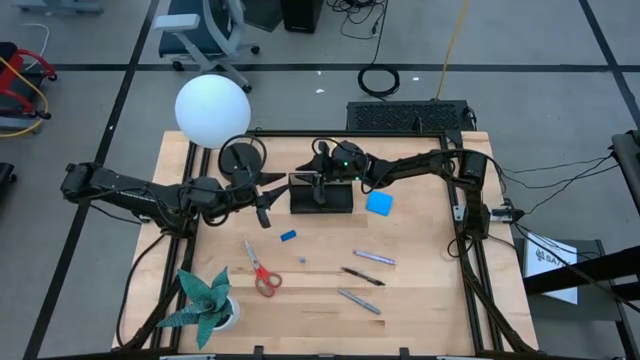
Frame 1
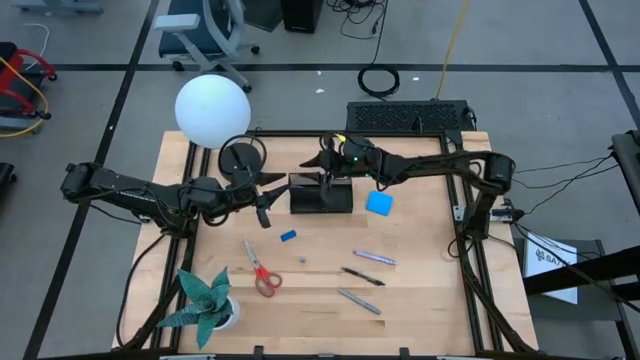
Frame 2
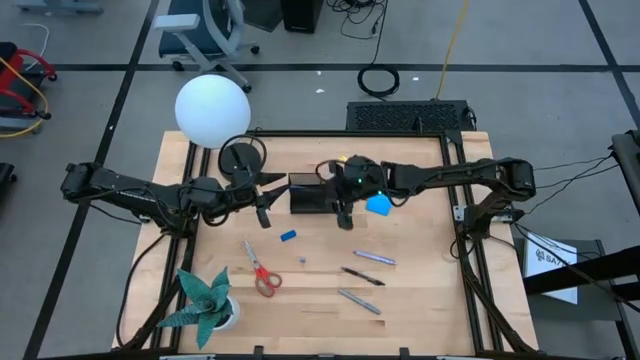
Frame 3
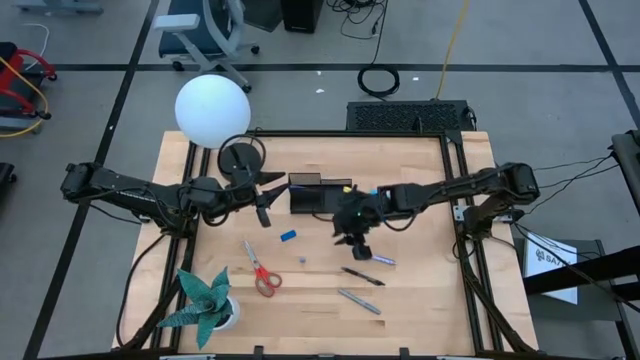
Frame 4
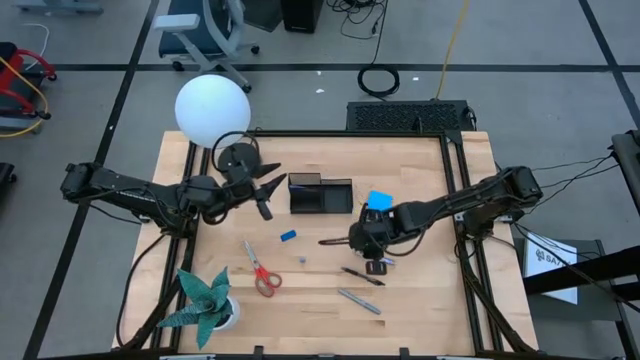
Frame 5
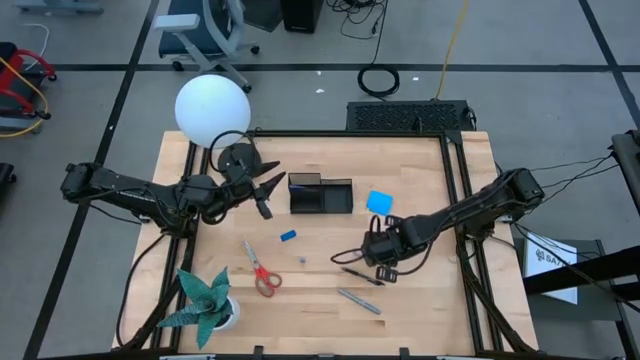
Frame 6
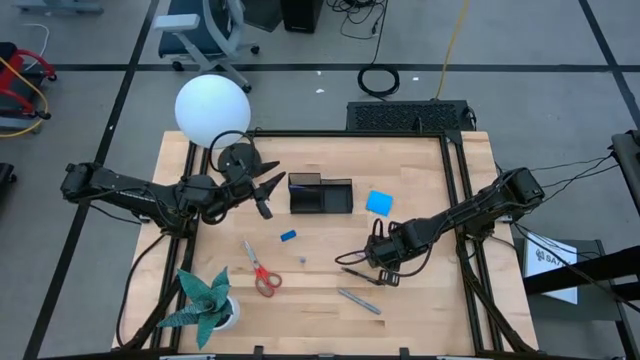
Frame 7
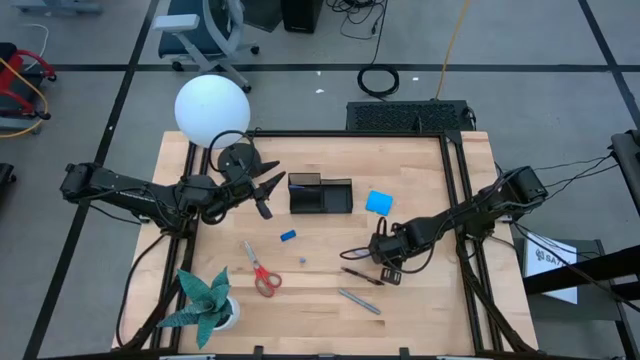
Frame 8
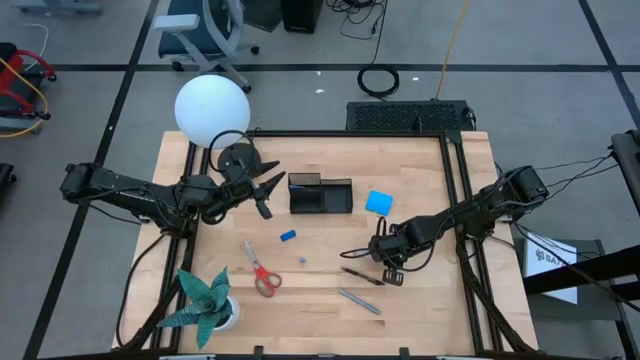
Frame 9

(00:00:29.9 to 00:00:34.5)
Task: Pick and place office supplies into organizer
Put the purple pen into the black desk organizer

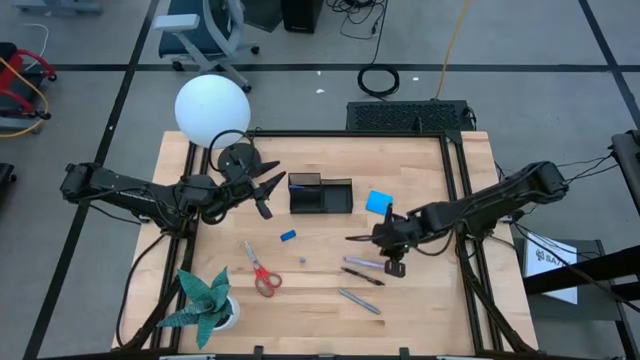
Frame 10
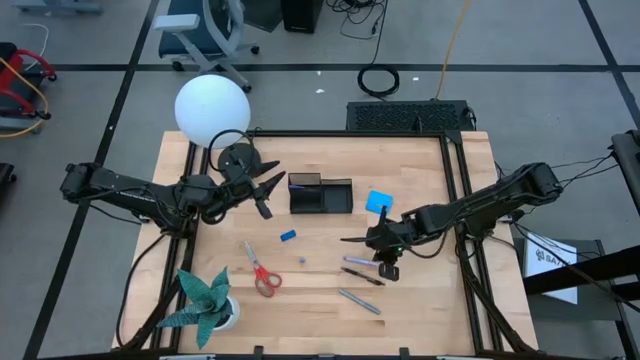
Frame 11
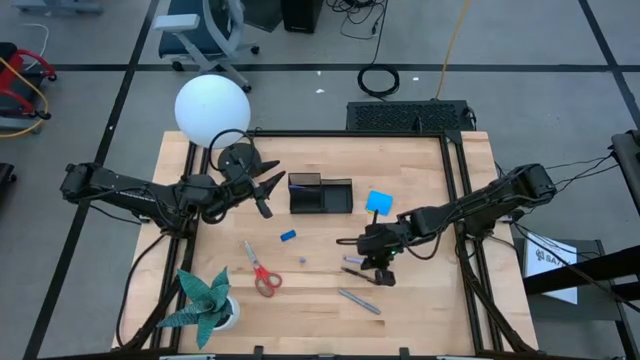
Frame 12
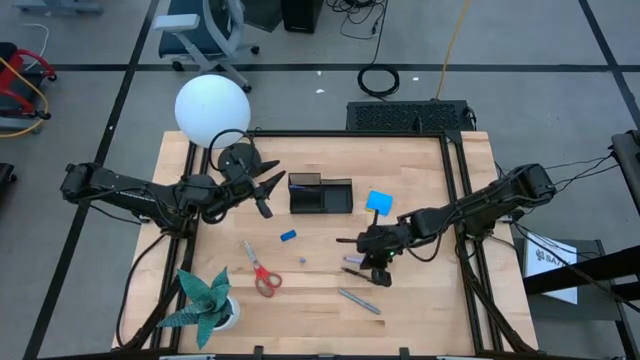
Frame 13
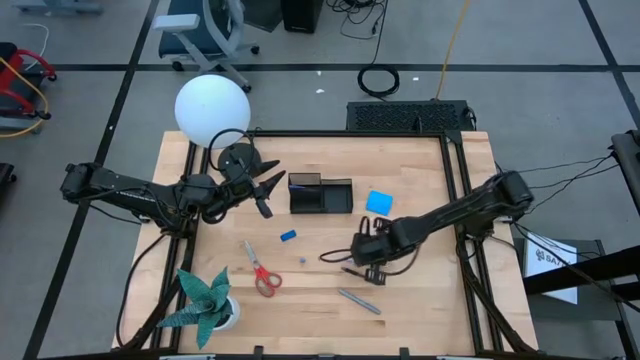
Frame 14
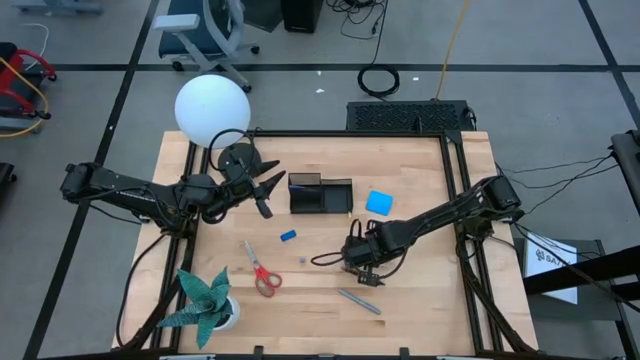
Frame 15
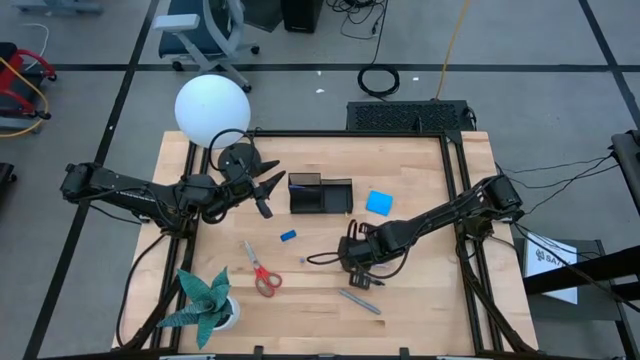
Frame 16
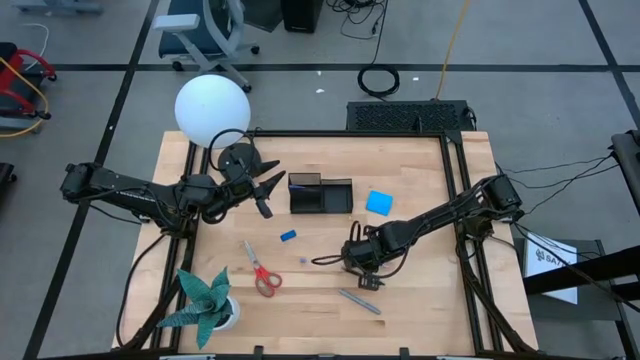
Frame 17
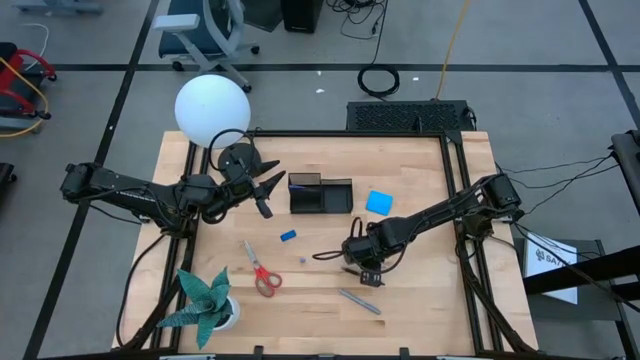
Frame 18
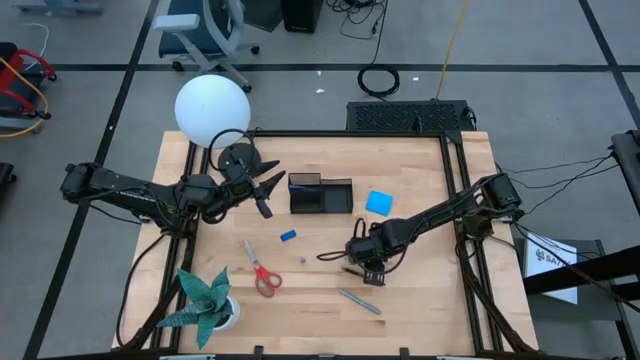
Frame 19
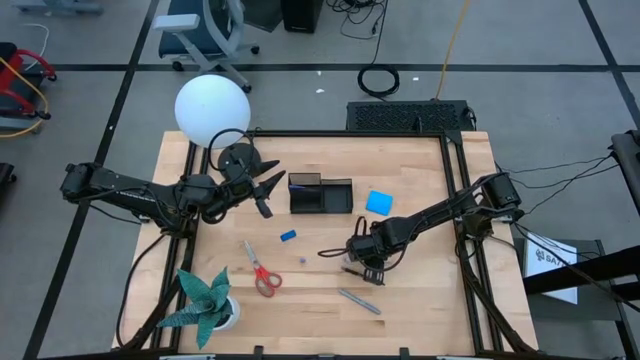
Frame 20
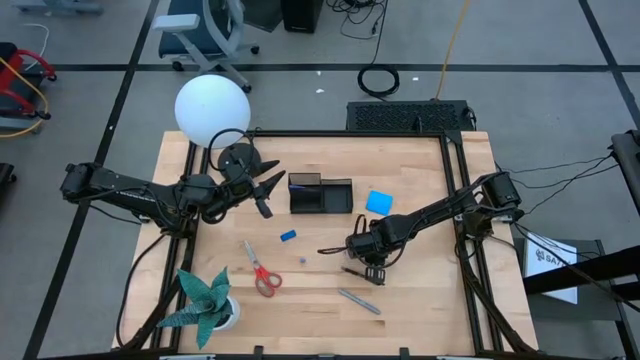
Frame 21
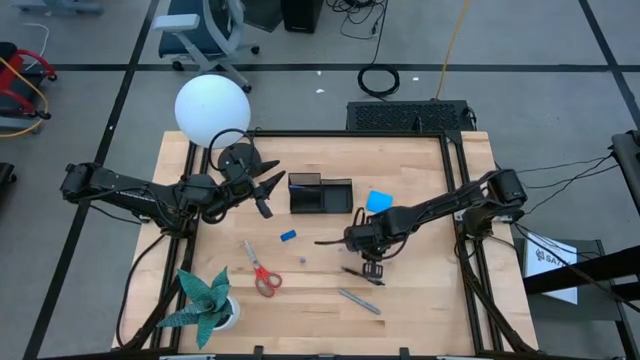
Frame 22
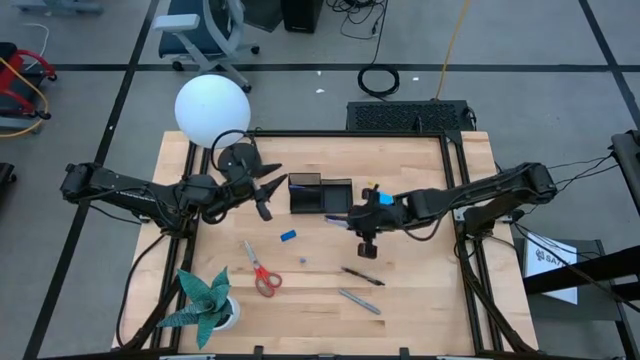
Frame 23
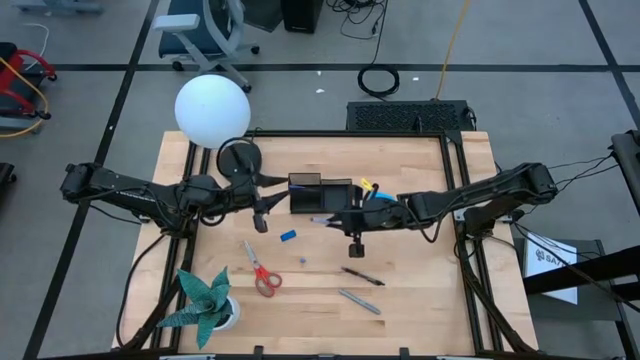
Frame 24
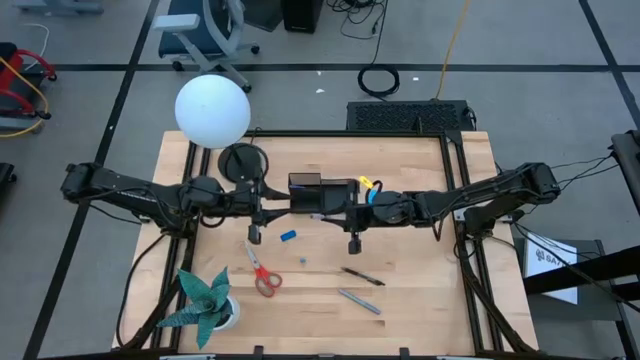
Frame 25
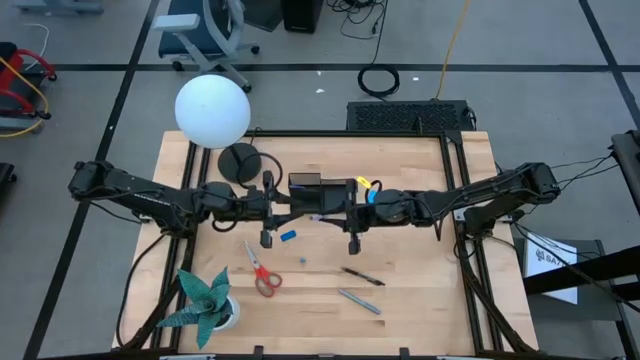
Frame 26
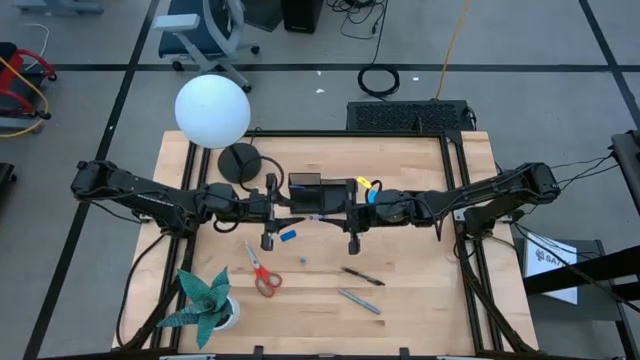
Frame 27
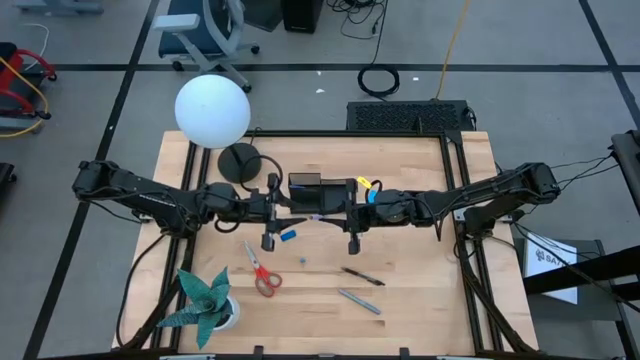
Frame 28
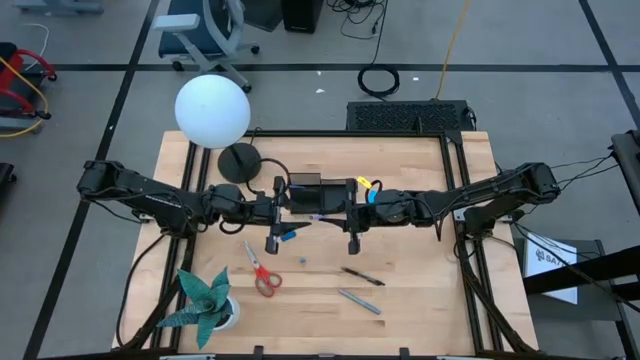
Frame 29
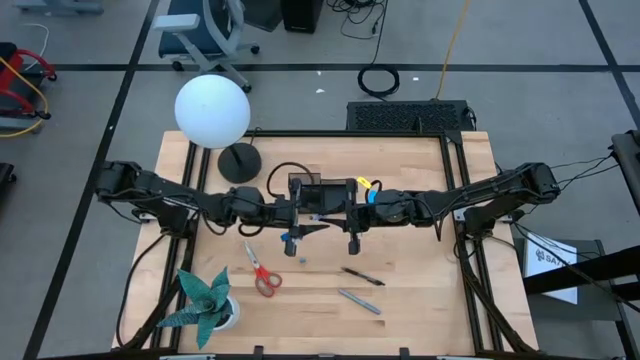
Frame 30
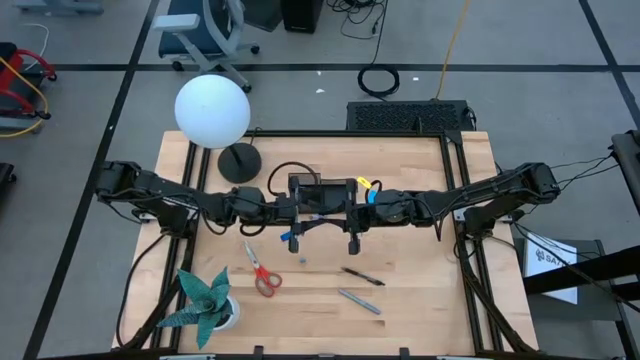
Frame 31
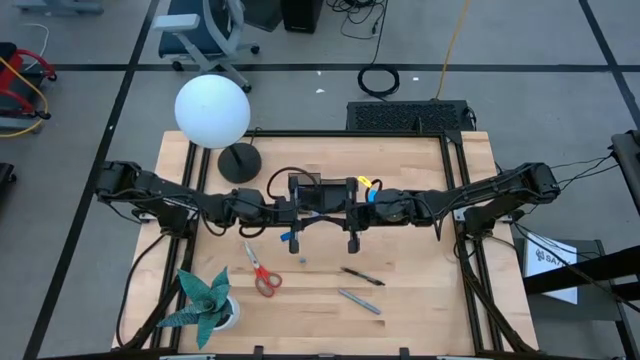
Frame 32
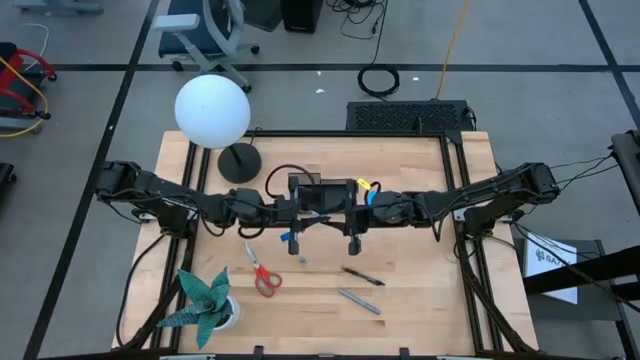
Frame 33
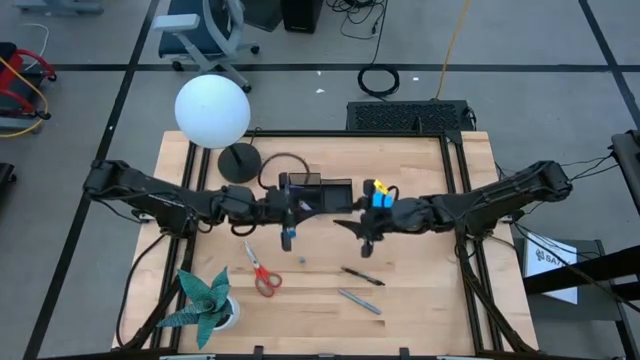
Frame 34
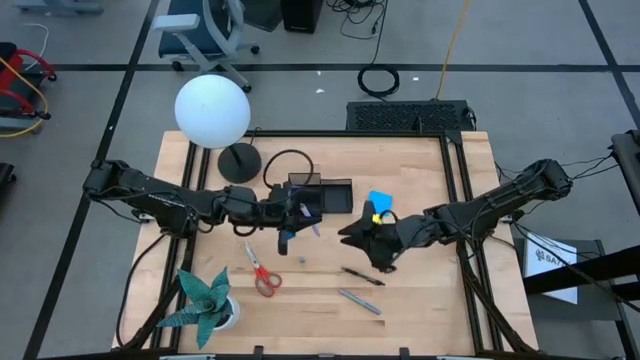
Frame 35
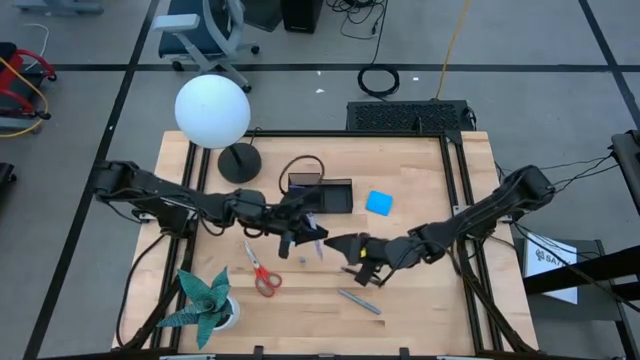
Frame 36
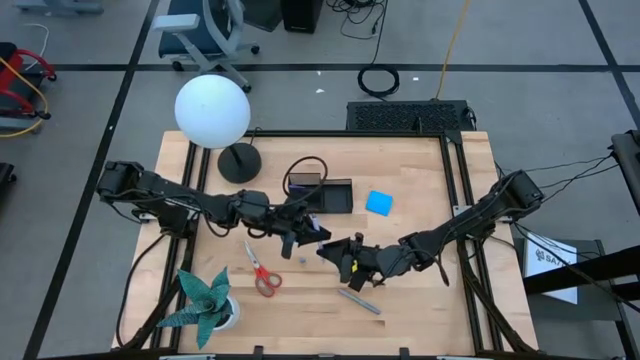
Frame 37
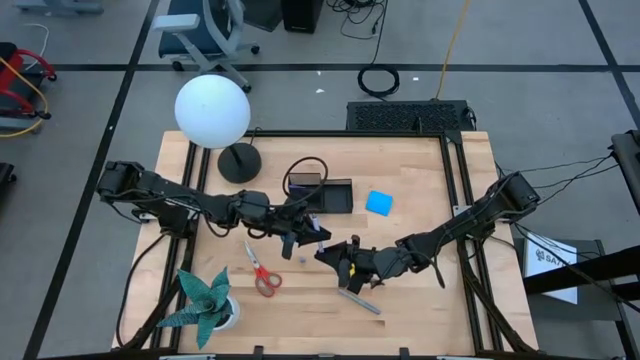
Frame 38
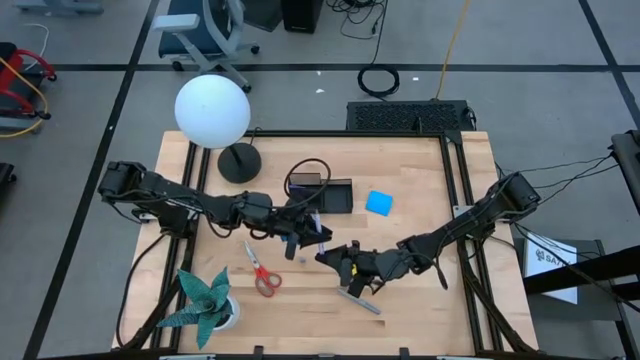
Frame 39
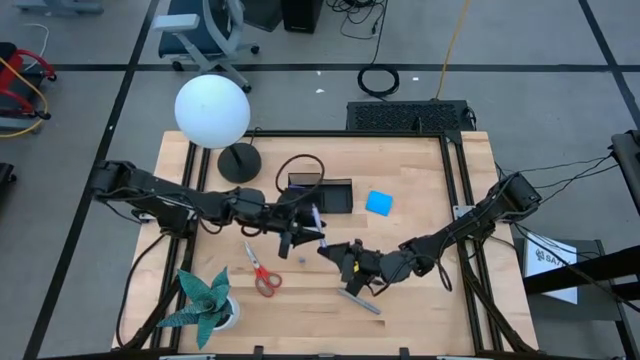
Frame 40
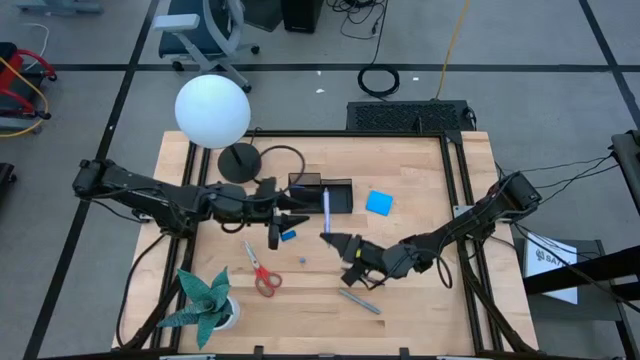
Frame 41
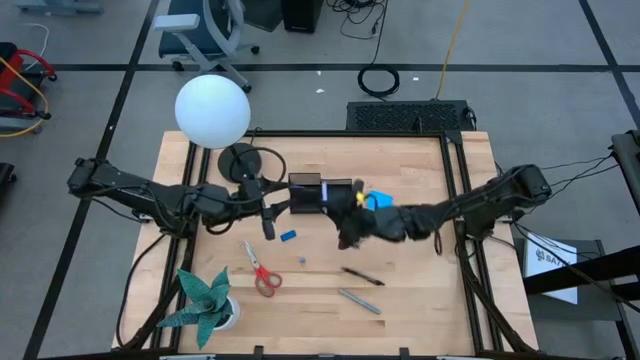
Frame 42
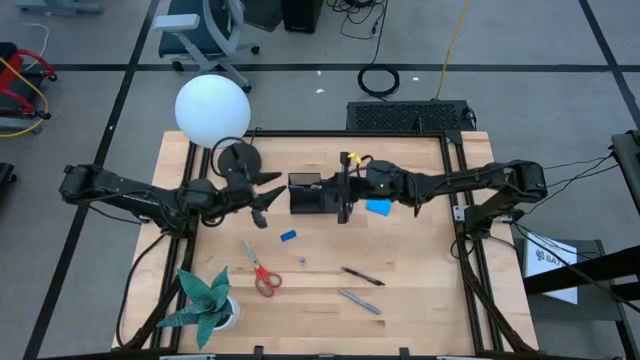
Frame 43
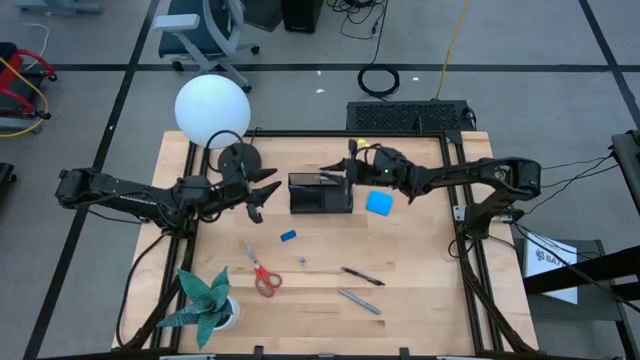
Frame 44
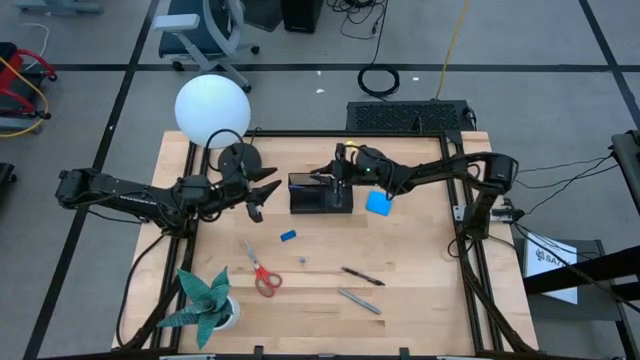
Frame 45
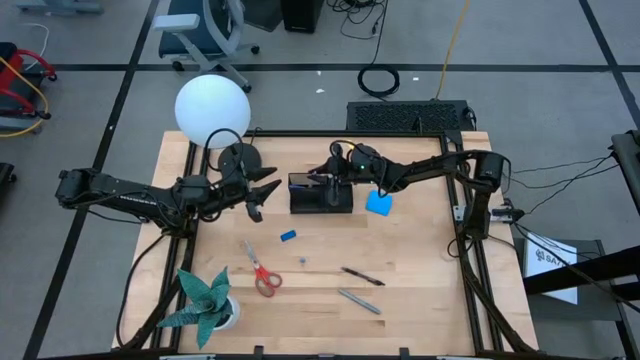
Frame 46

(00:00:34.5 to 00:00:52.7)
Put the purple pen into the black desk organizer
